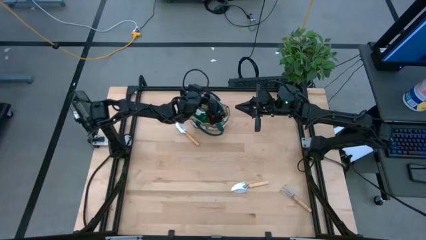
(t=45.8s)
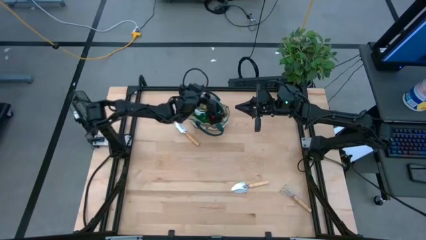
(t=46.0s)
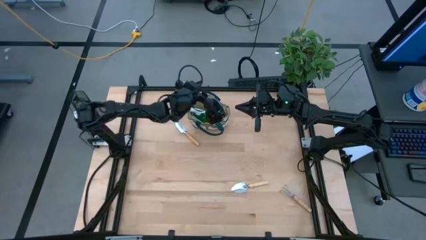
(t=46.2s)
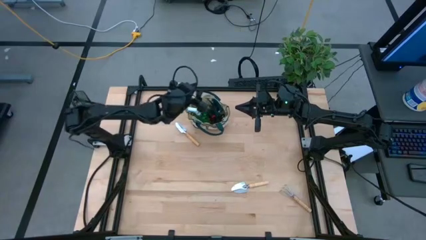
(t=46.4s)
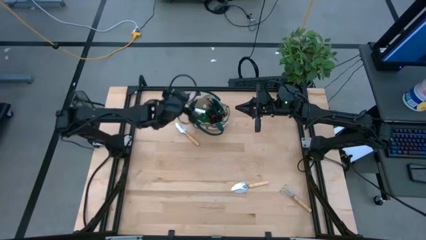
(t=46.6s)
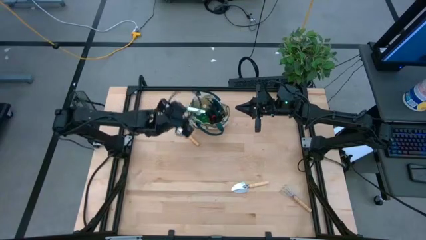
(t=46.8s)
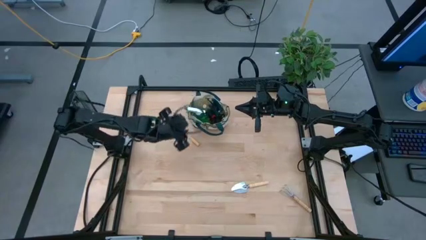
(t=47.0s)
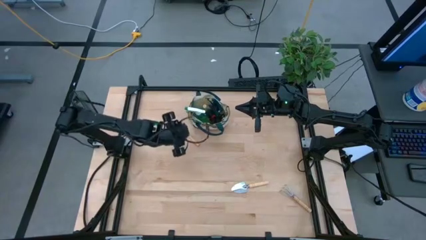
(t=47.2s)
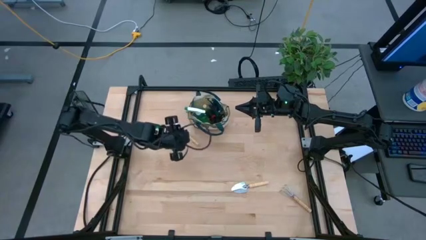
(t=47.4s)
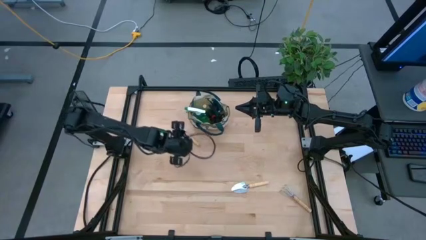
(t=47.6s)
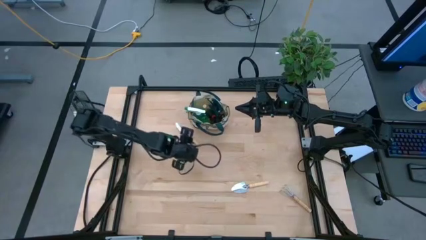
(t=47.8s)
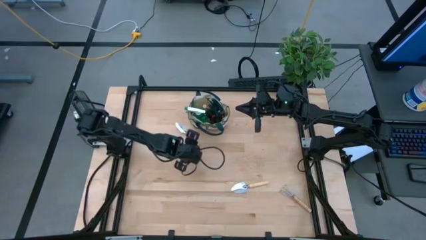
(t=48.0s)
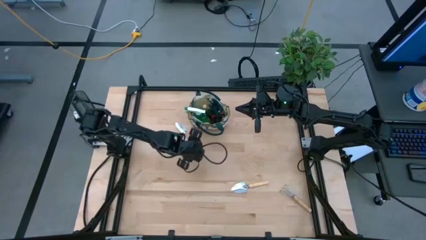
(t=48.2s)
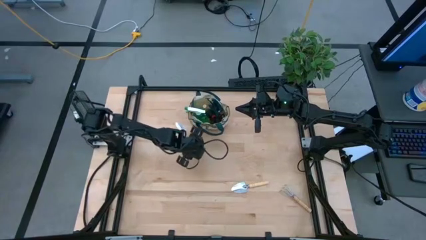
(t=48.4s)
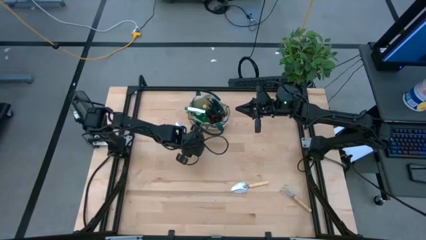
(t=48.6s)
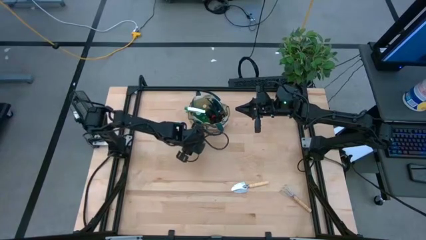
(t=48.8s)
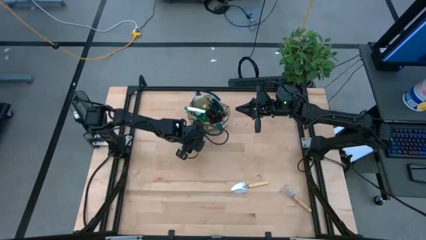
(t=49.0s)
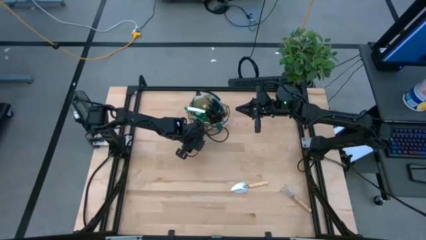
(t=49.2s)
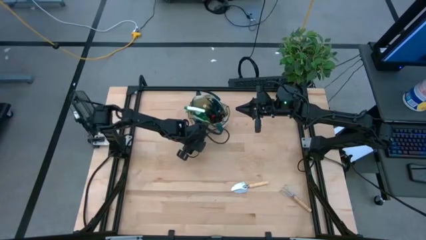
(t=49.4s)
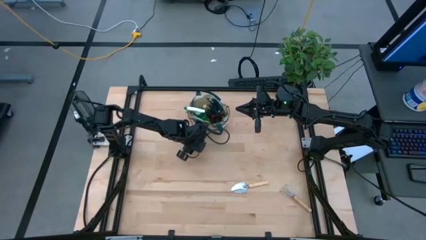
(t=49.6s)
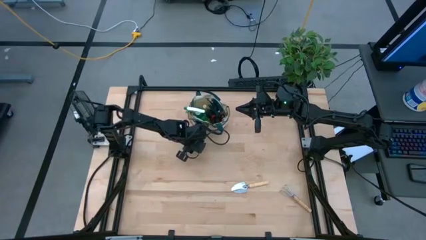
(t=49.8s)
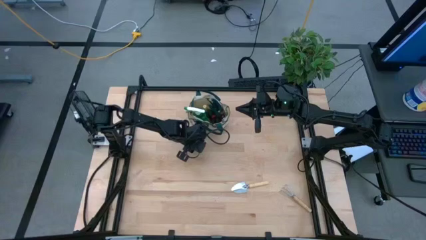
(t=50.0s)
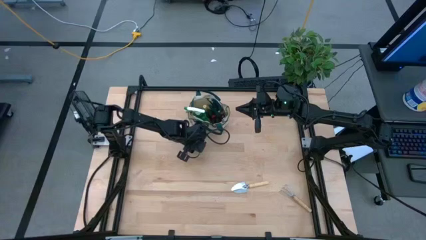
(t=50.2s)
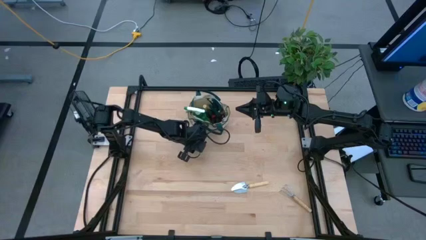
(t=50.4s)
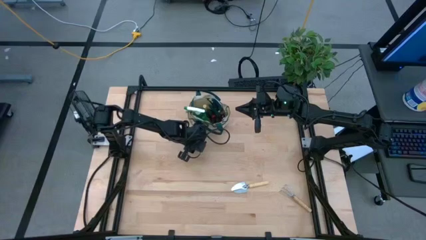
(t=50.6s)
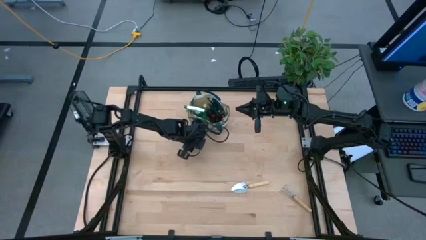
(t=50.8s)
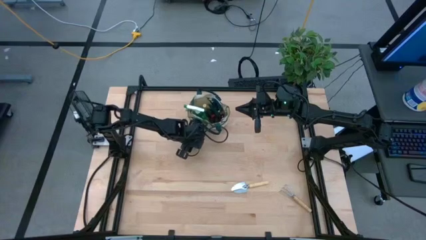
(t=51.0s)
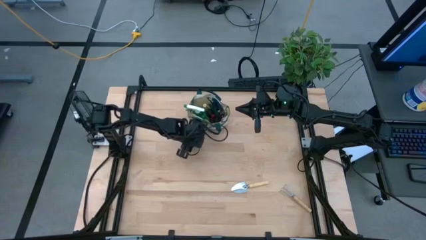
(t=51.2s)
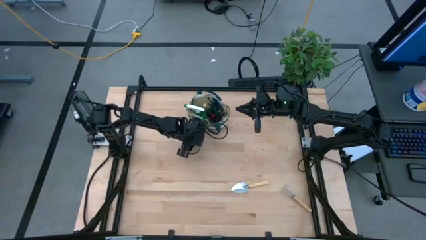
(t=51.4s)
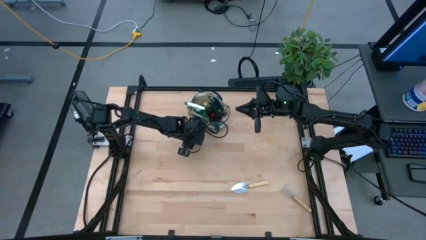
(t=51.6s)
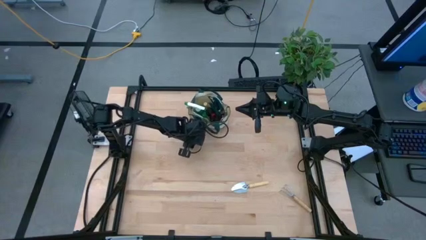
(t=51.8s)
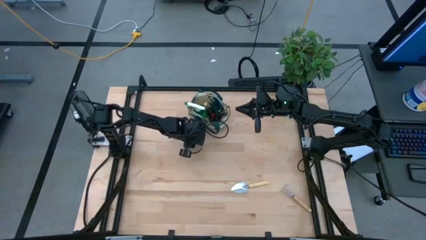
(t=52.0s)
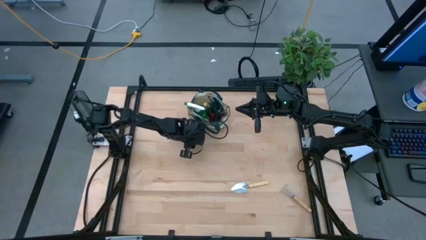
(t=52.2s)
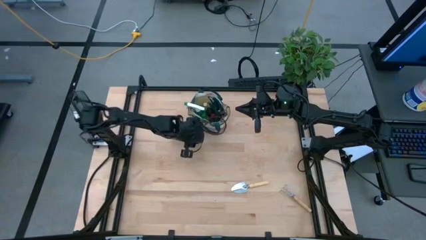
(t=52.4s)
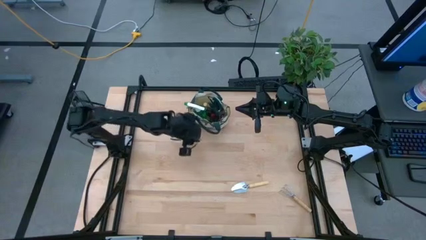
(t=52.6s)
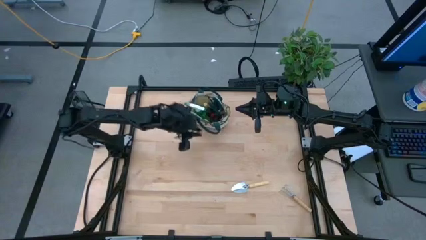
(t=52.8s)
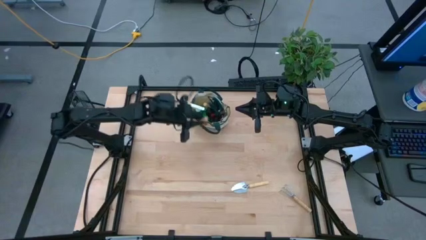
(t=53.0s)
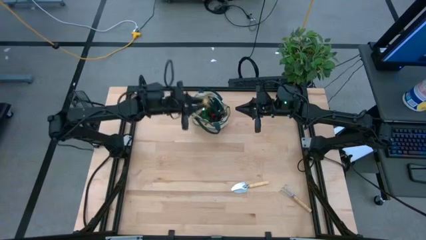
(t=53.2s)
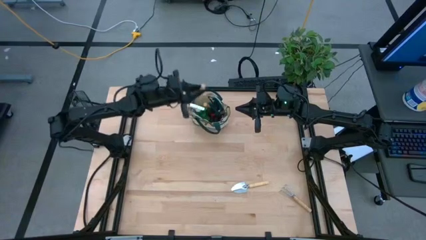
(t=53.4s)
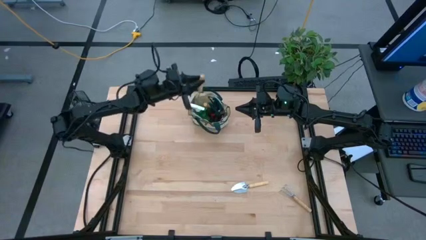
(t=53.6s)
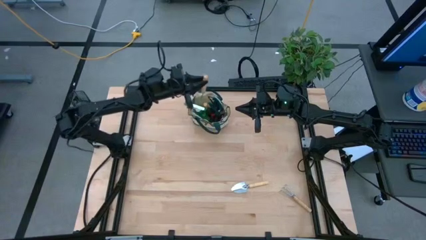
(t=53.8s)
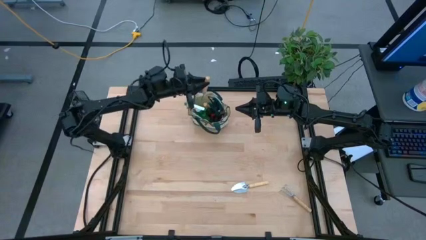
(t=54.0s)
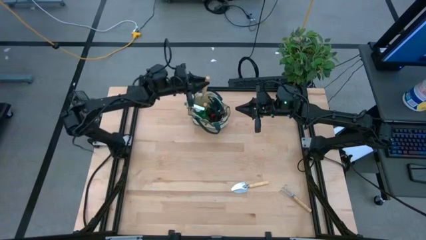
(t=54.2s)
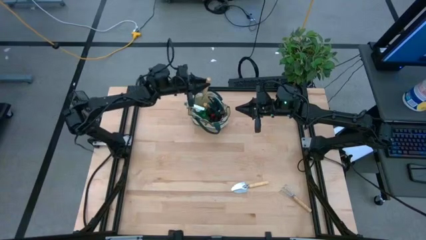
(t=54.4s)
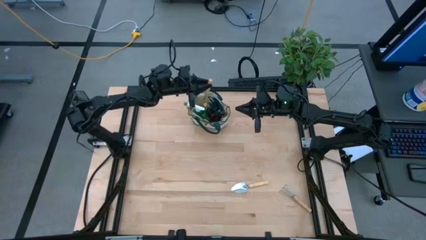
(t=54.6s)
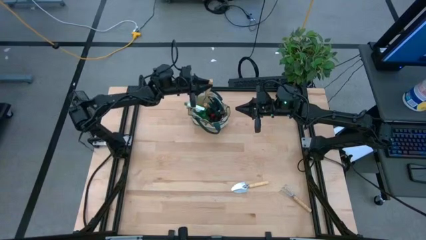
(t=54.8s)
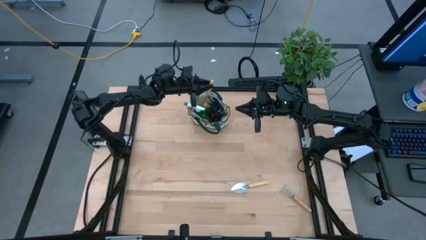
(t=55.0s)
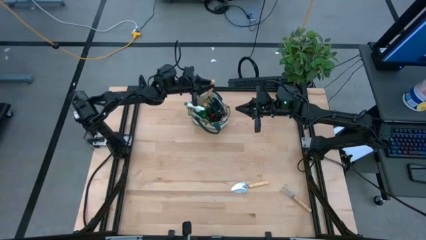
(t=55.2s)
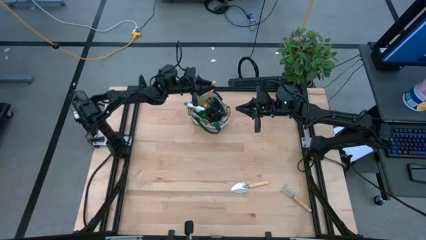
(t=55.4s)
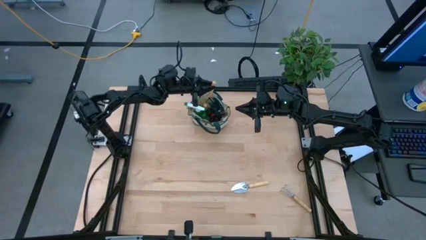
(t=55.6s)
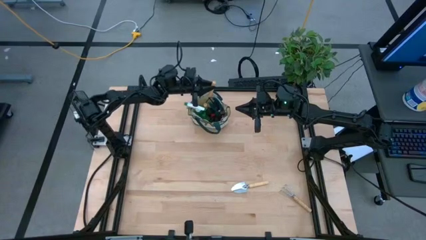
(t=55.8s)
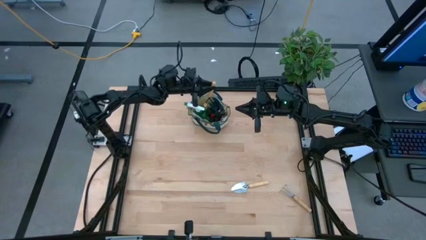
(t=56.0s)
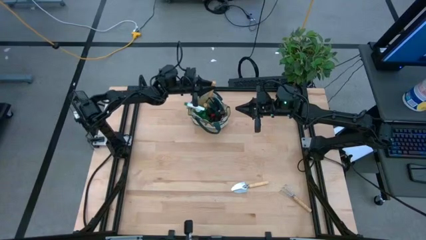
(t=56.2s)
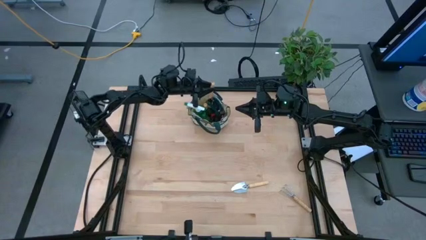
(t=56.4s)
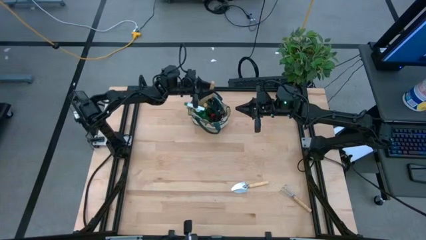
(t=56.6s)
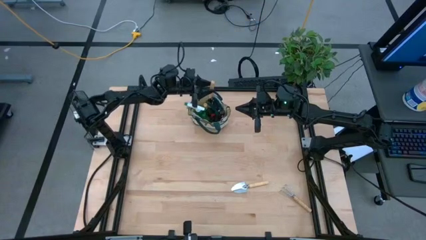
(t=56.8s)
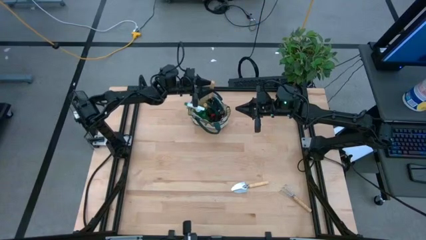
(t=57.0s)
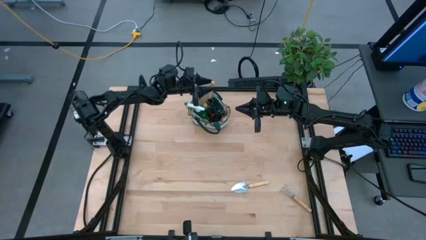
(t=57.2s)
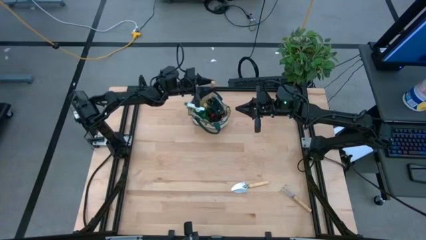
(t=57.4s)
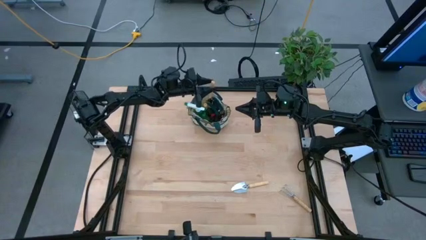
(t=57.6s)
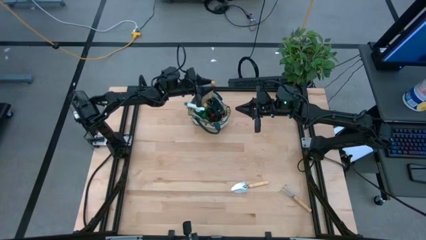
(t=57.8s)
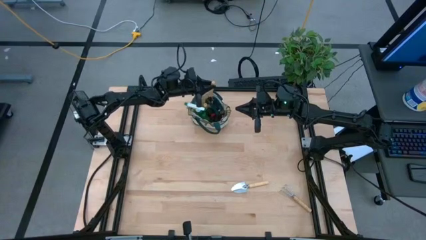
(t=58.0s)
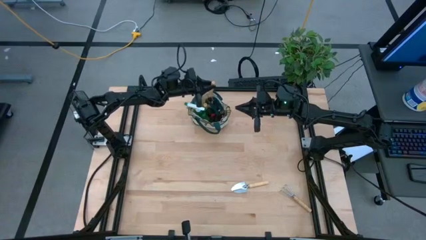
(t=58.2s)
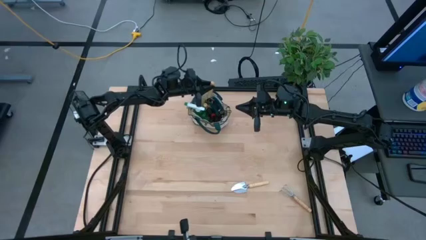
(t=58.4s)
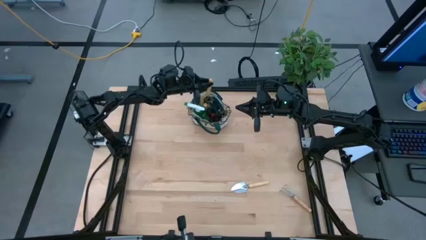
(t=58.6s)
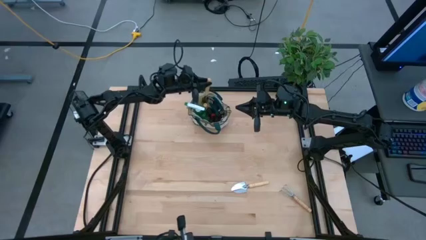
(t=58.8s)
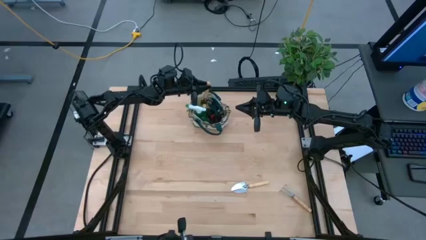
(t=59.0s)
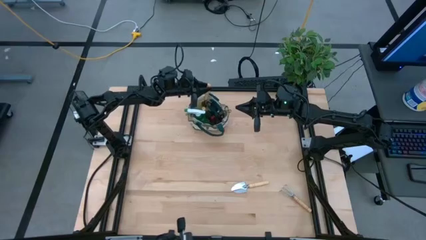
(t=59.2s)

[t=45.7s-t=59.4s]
Task: Pick & Place Garden tools in Gardening bag
Put the brown trowel into the gardening bag

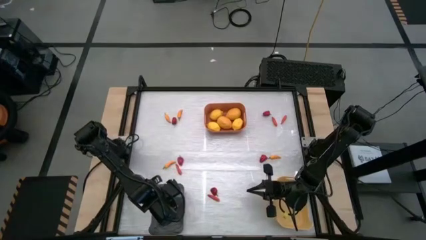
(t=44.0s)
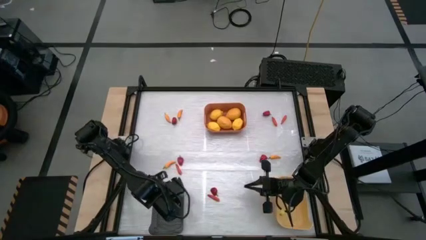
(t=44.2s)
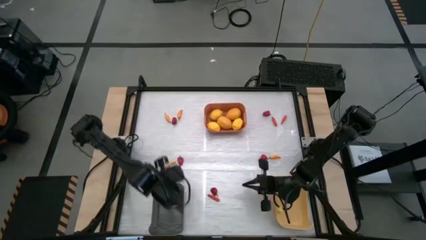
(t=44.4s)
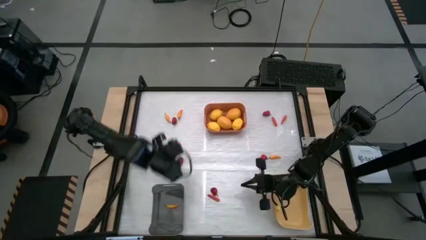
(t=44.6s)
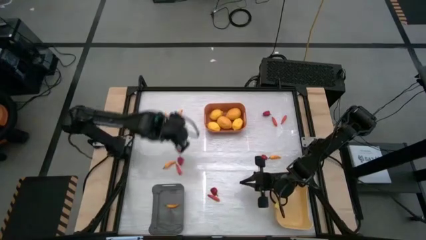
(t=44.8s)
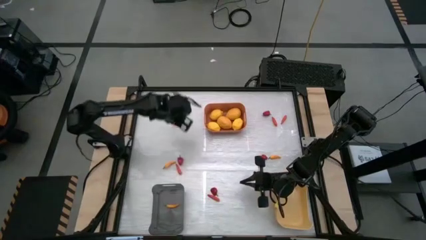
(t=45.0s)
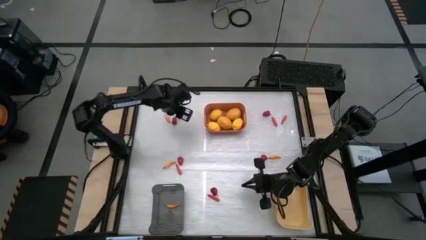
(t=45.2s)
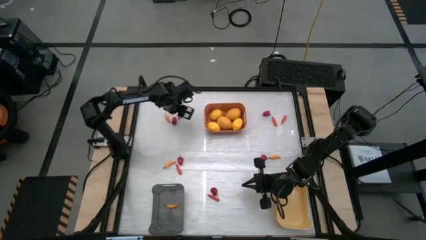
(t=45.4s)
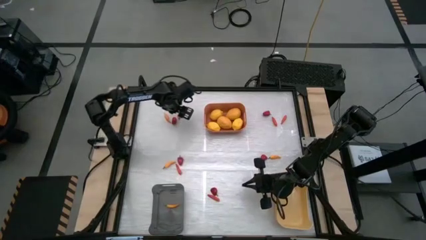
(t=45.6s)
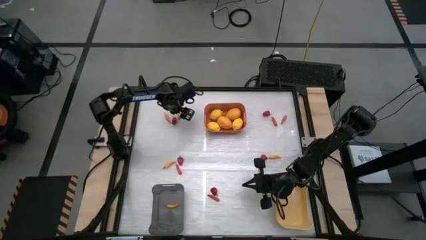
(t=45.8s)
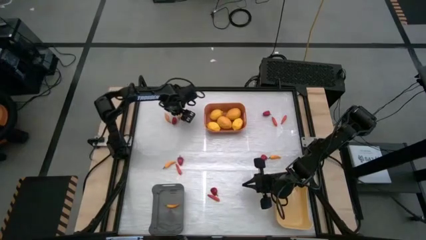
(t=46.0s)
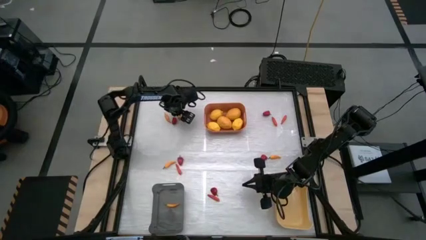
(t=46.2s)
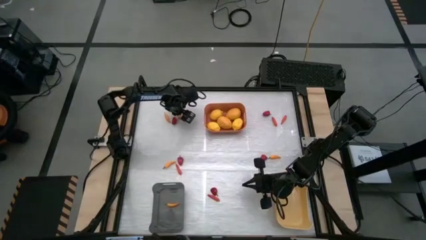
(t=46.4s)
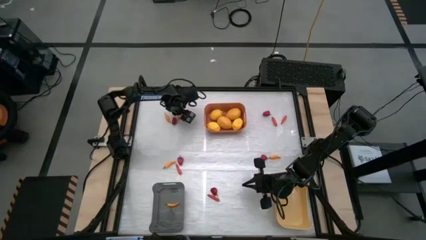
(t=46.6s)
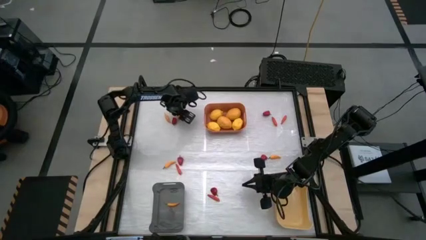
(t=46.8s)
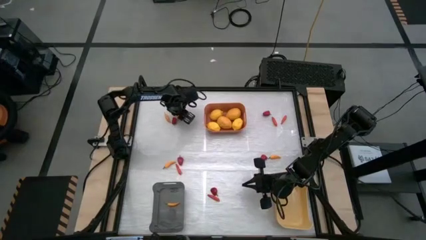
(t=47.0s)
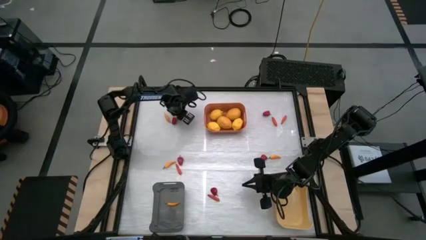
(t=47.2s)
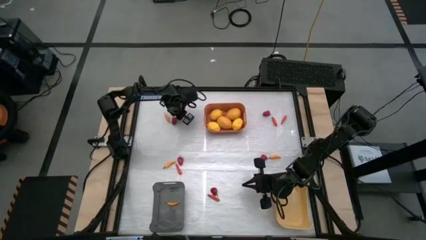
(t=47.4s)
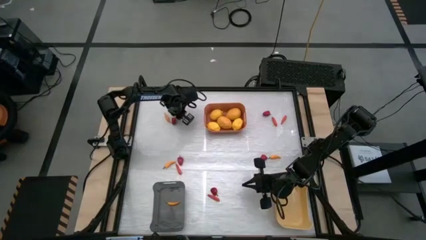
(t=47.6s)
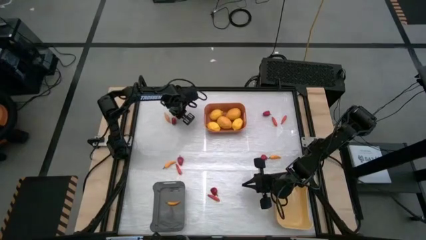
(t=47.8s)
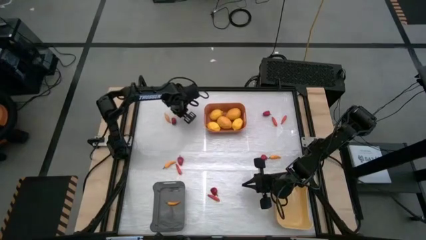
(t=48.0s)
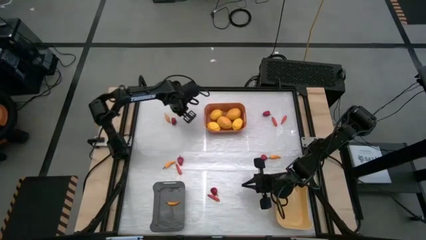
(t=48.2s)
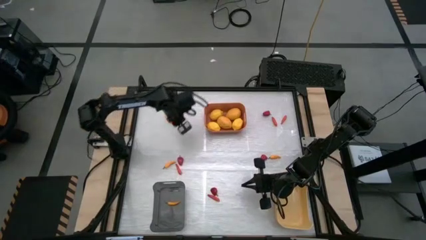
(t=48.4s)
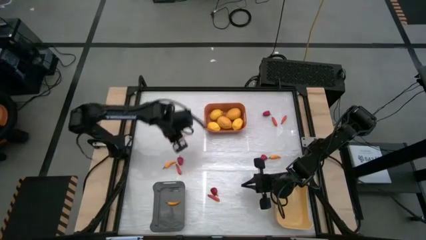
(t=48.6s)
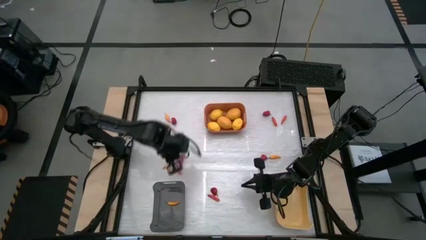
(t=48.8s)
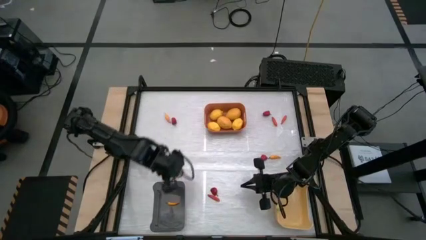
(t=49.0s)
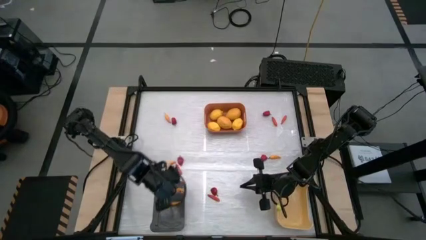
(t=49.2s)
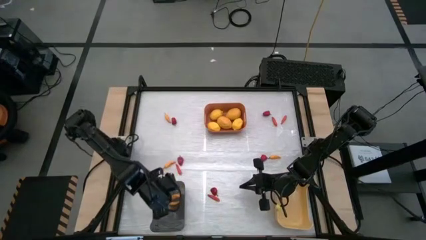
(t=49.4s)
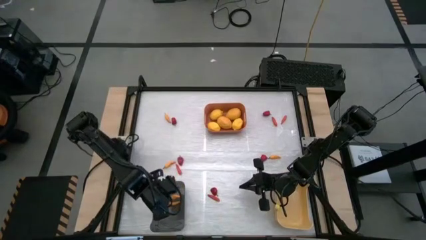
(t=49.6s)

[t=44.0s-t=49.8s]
Task: Sort produce into baskets
Put the yellow chili pepper into the black bin
